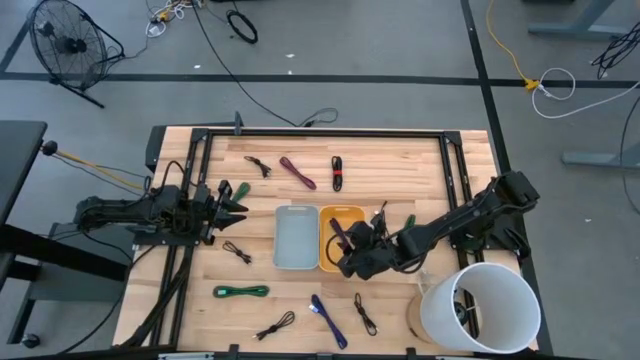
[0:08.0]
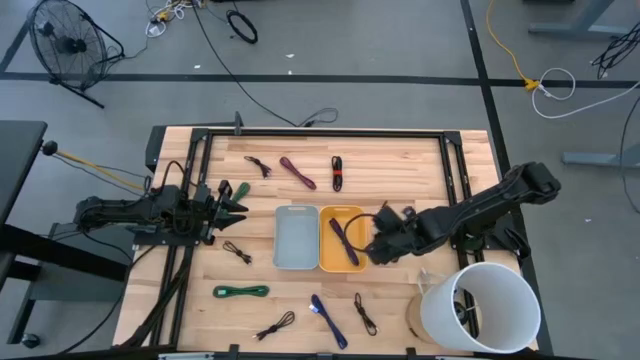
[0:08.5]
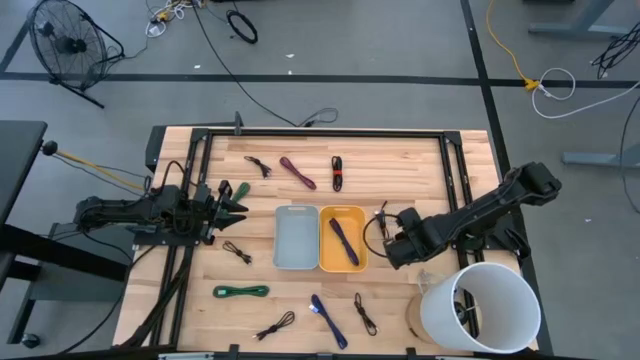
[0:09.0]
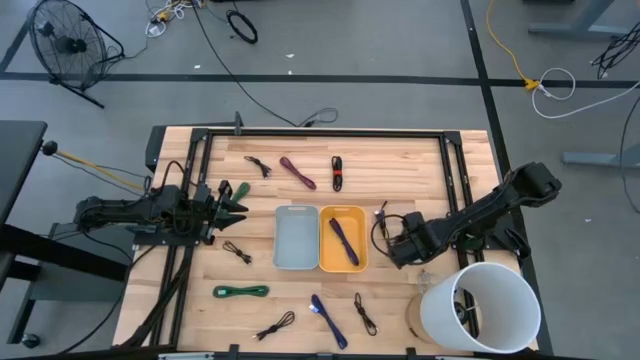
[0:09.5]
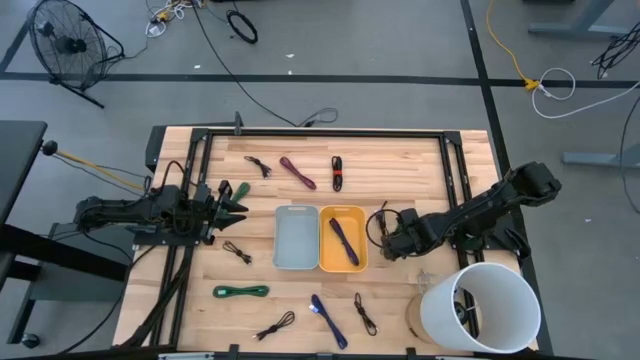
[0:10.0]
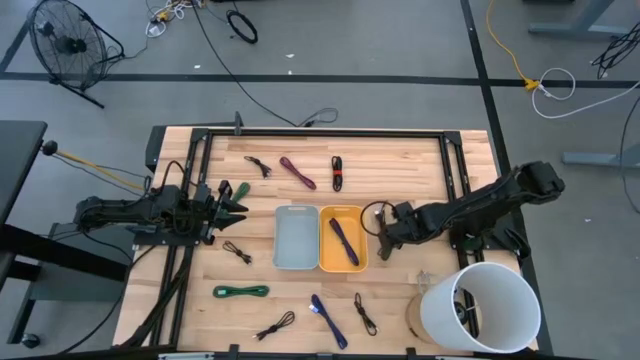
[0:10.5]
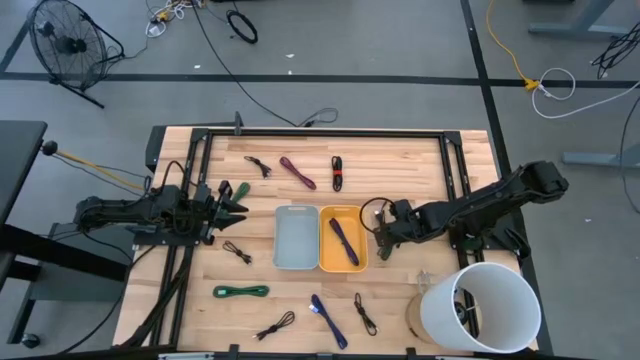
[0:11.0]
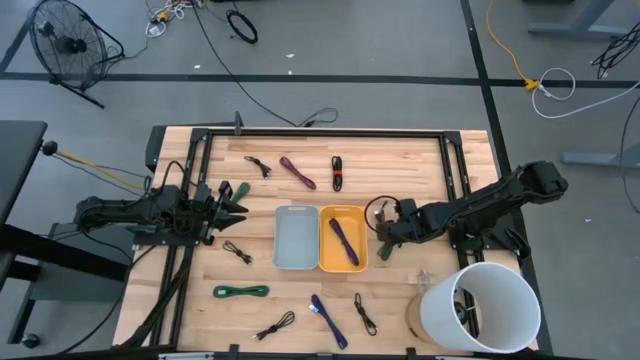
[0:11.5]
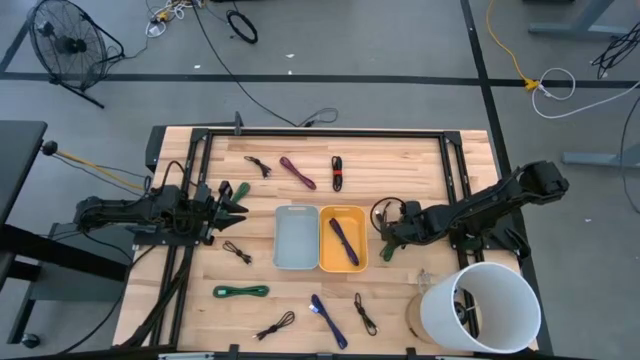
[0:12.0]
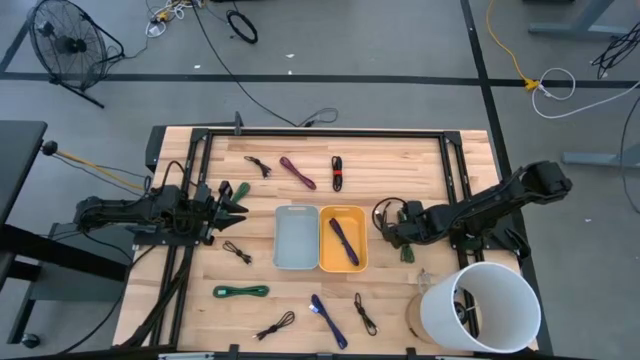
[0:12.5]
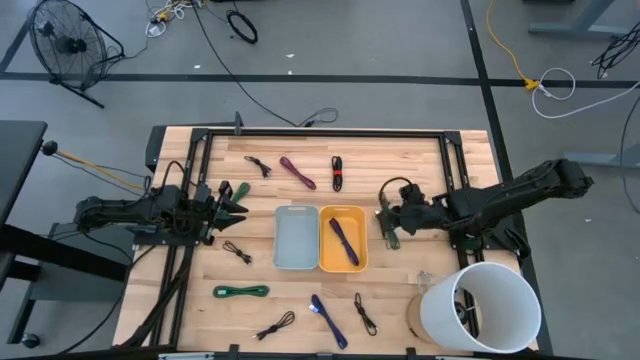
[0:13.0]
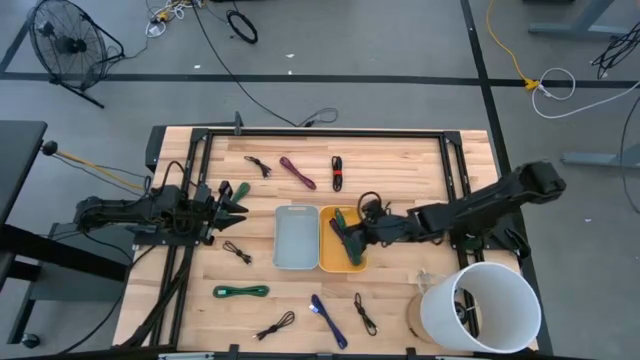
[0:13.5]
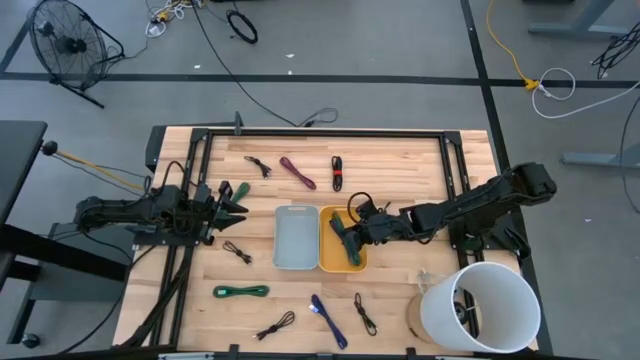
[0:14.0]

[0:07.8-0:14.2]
Task: Pick & Place USB Port
Put the green charger cable into the yellow bin

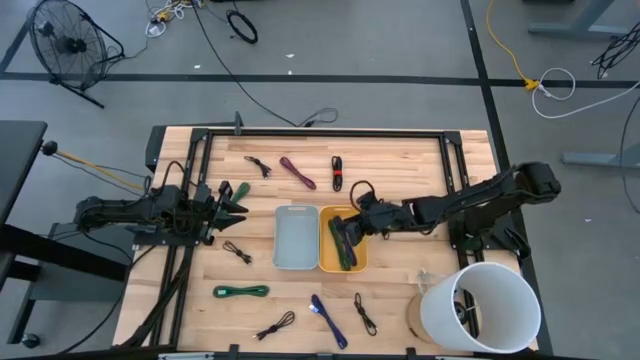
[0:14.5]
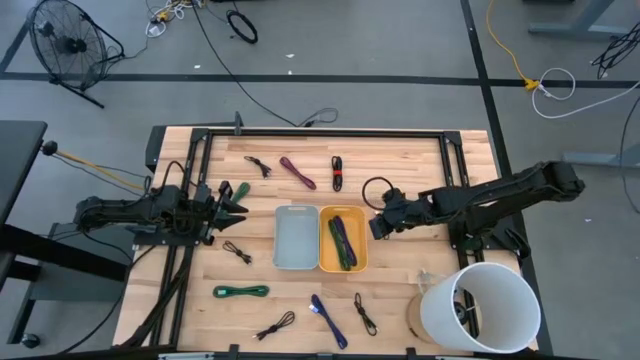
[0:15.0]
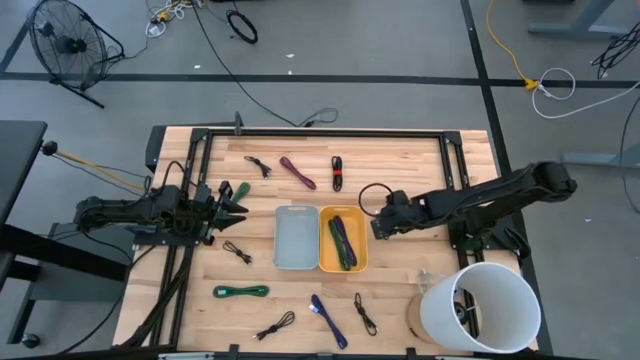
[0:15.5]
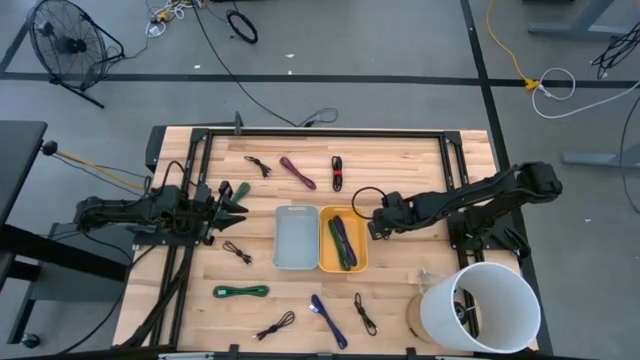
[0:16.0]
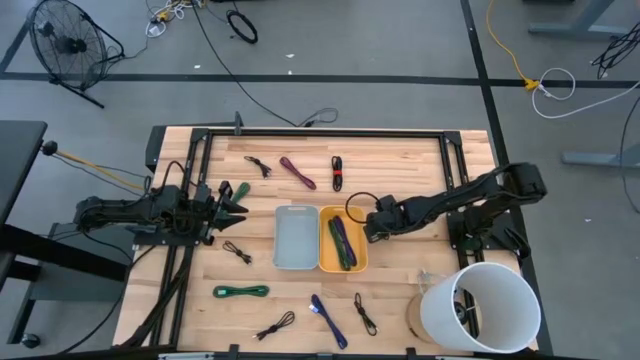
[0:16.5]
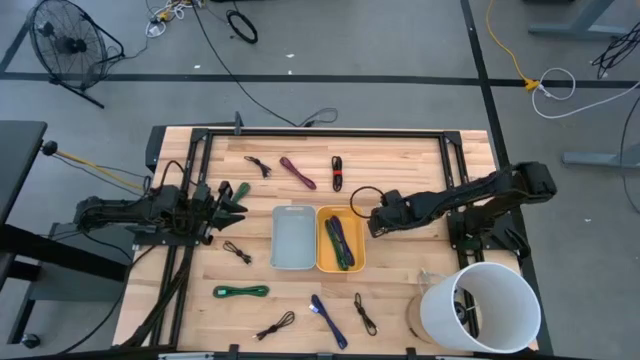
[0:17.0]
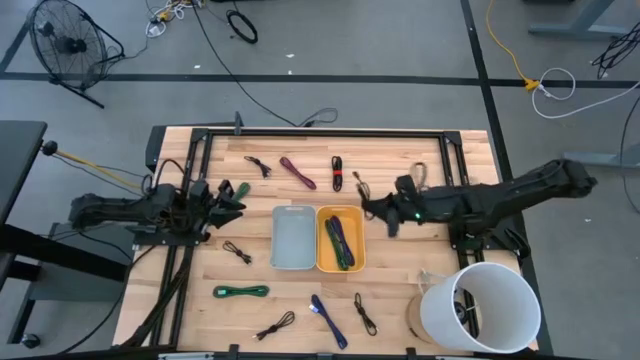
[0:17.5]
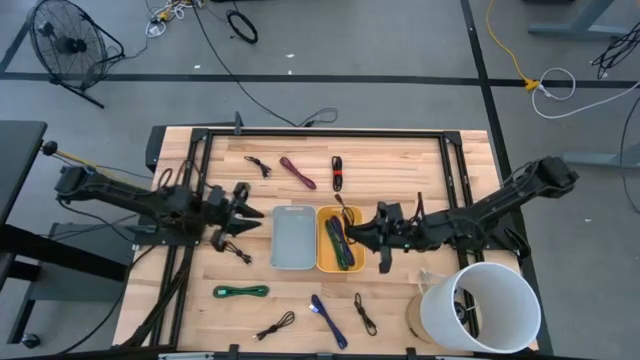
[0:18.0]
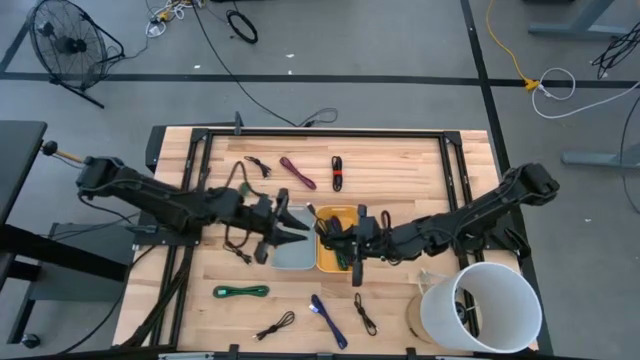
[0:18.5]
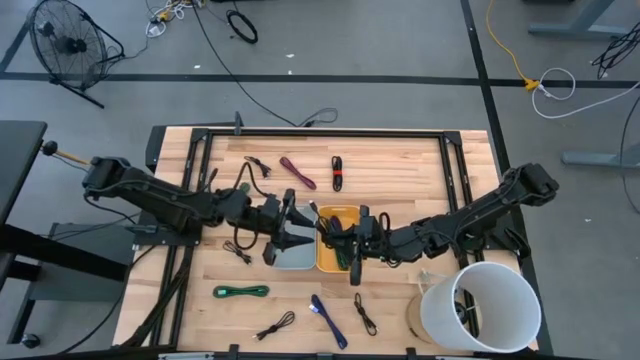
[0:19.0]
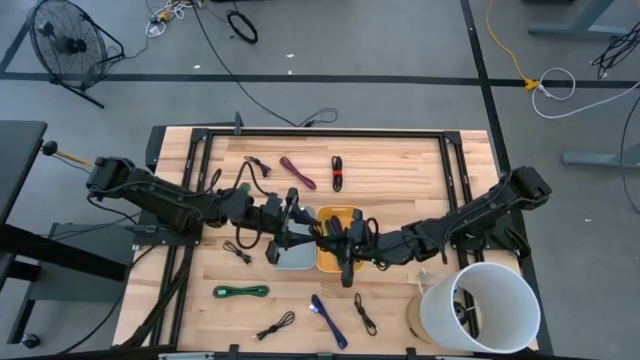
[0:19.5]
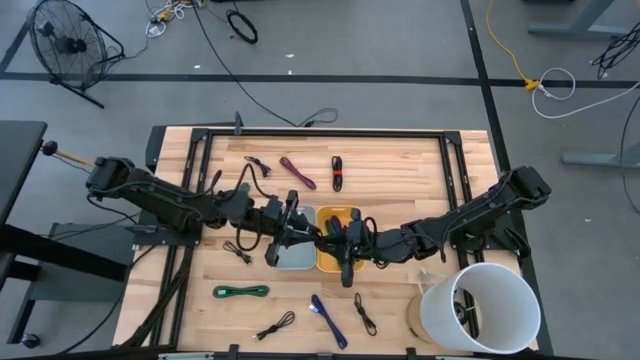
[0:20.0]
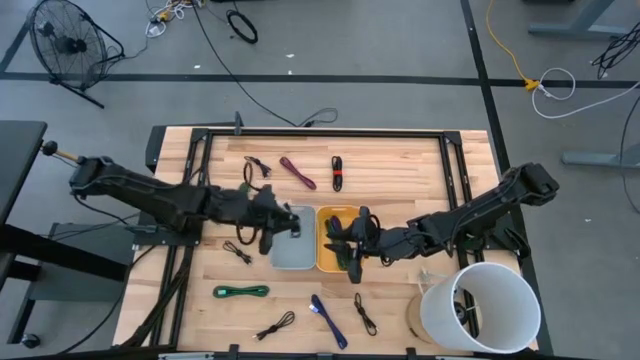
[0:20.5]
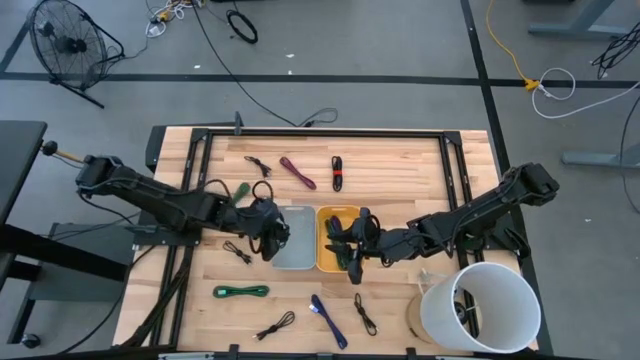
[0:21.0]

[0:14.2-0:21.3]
Put the black charger cable into the gray bin

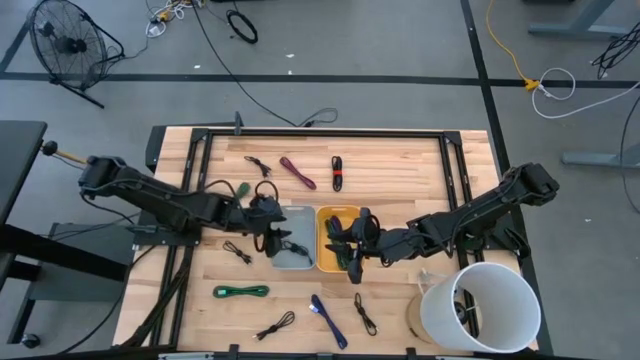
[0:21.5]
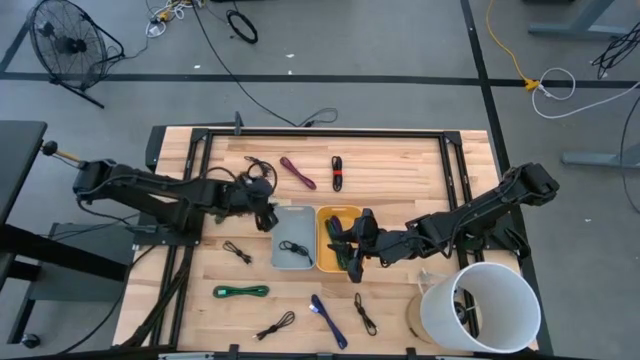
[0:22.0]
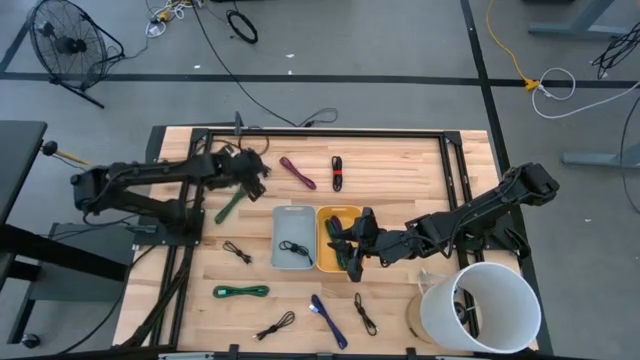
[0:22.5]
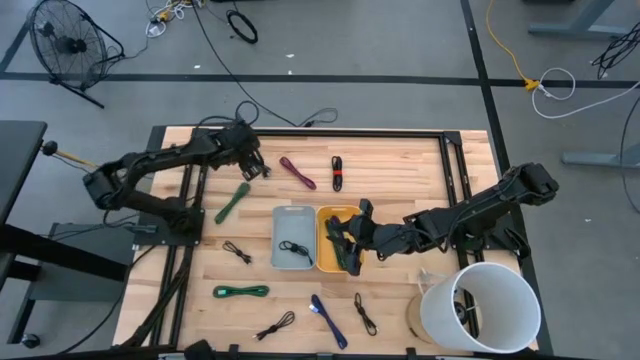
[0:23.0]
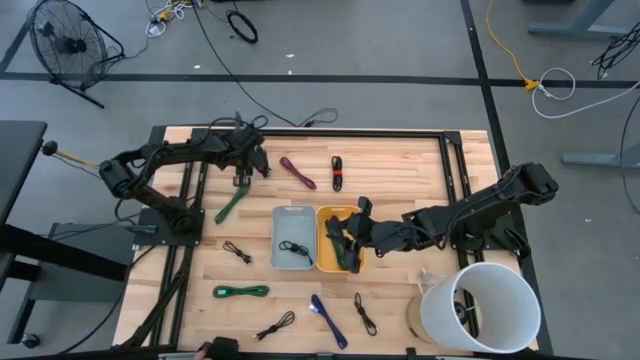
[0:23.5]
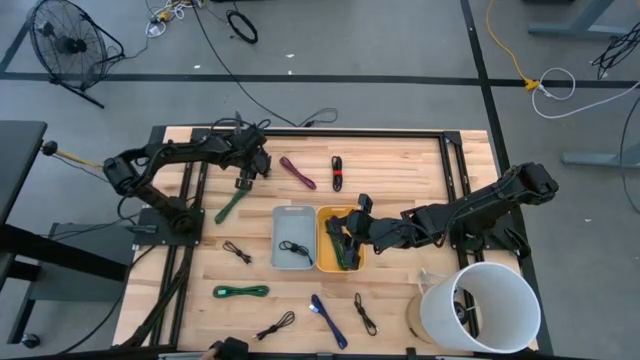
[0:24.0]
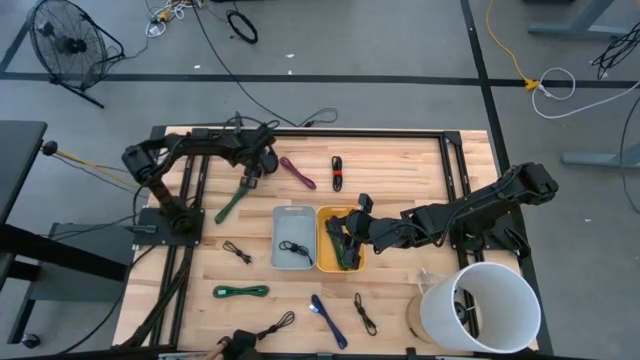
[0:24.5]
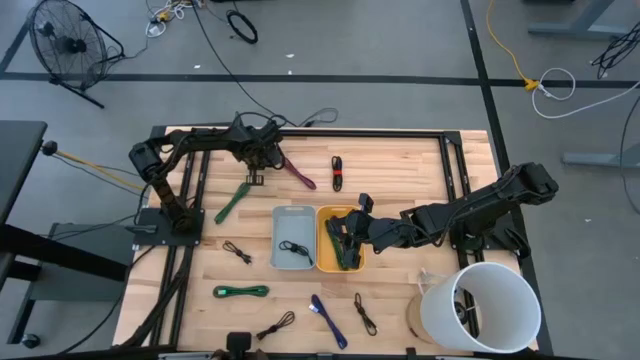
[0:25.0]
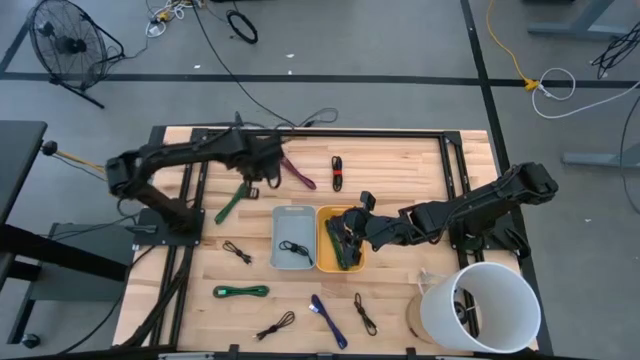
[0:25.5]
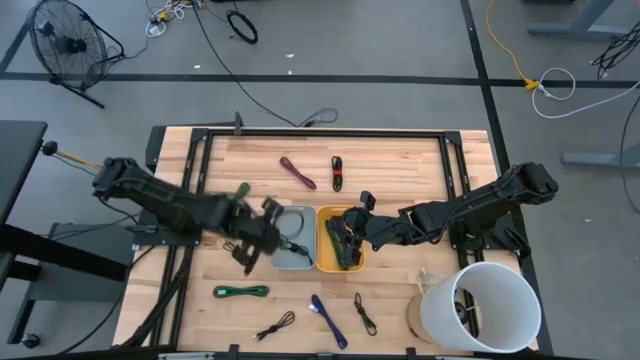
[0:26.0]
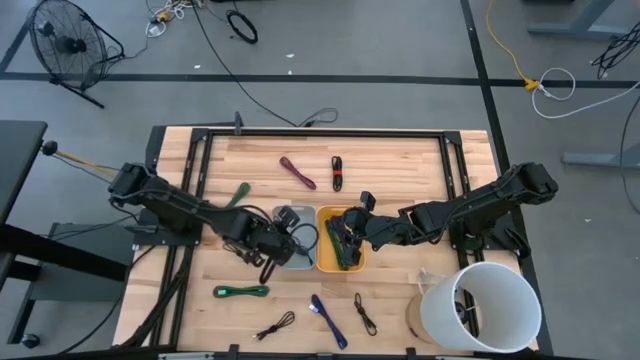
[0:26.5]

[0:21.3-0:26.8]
Put the black charger cable into the gray bin

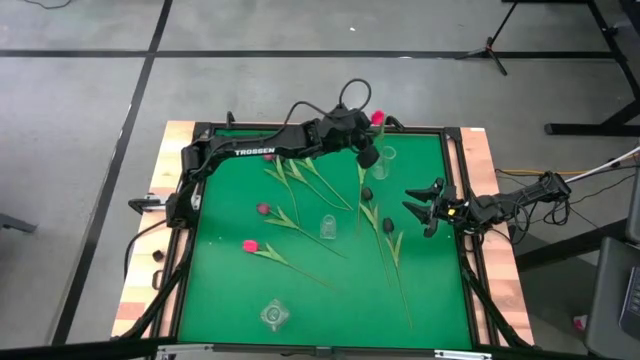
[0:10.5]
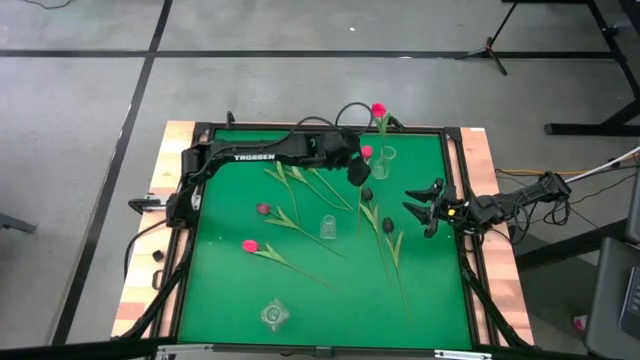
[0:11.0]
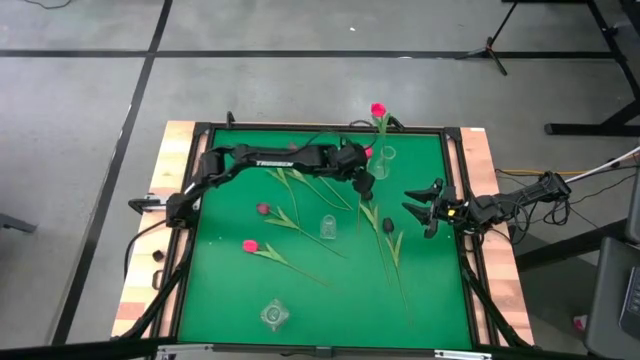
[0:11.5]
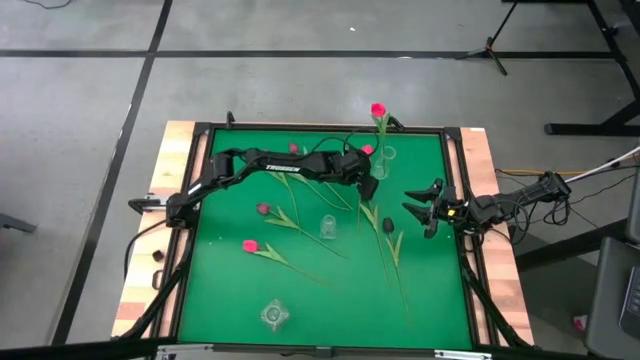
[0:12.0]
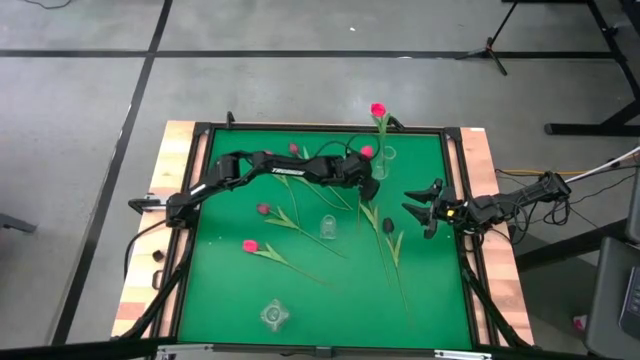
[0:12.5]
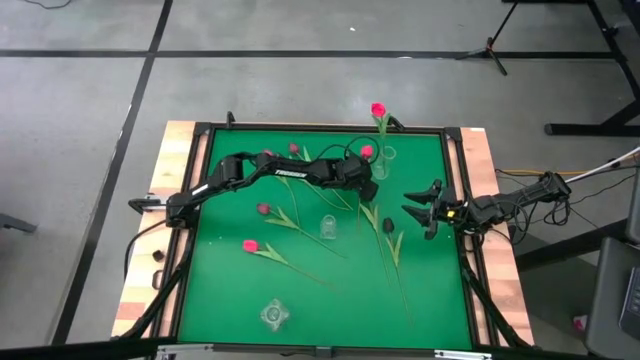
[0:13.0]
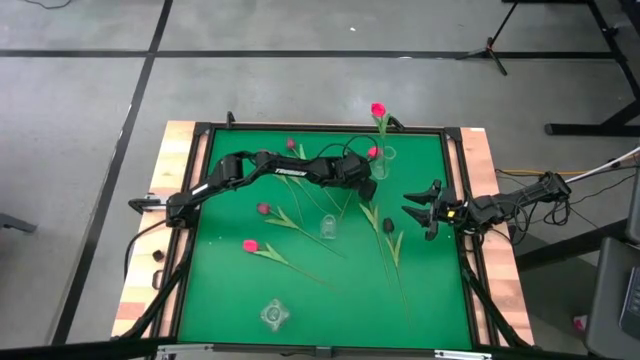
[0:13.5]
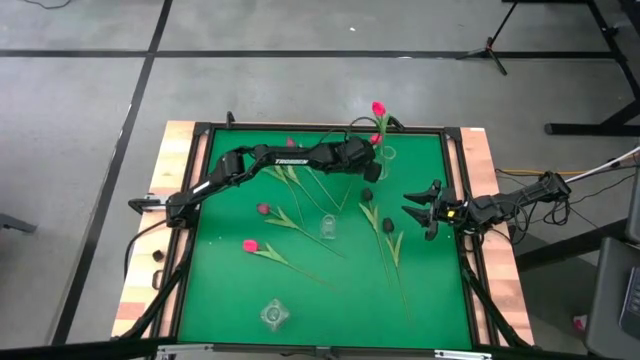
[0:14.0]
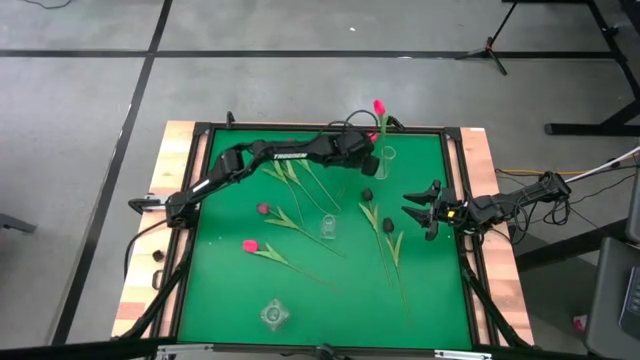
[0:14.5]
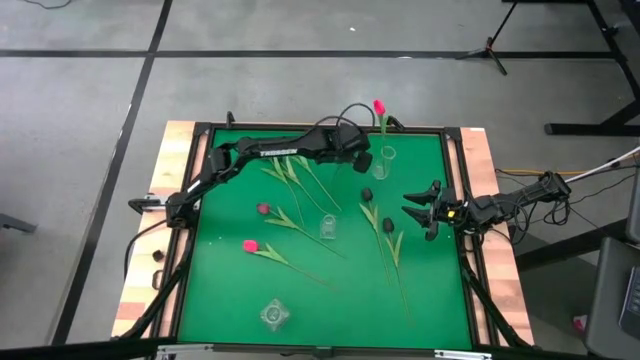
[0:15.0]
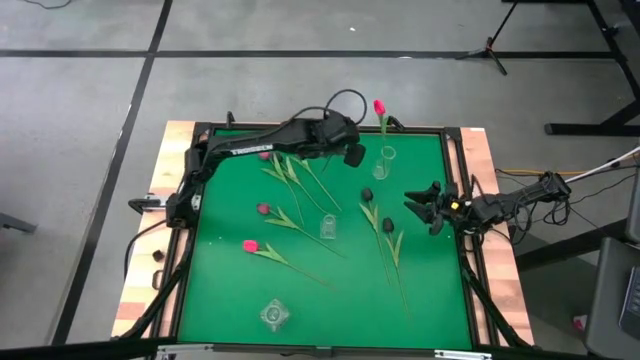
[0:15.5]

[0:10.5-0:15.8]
Task: Sort flowers into vase by color
Put the top pink tulip into the top transparent vase
